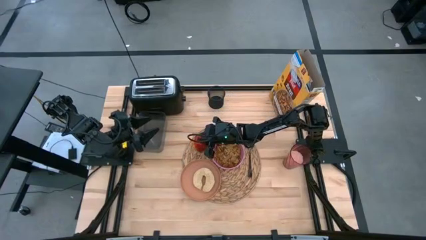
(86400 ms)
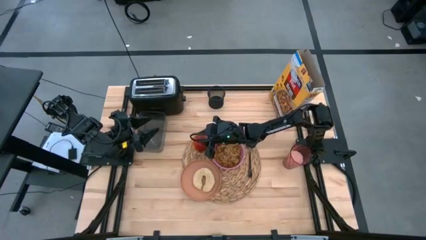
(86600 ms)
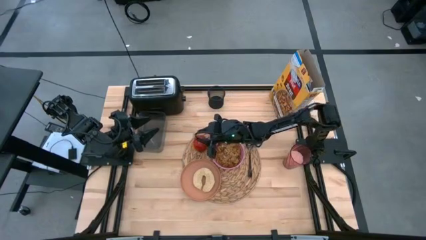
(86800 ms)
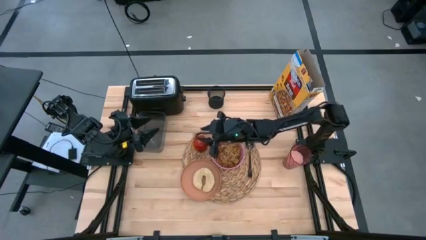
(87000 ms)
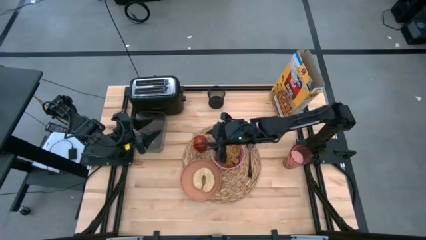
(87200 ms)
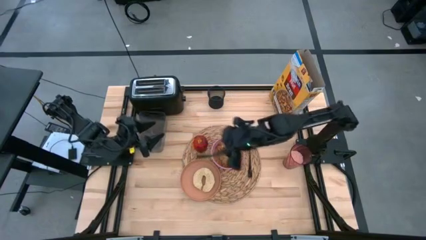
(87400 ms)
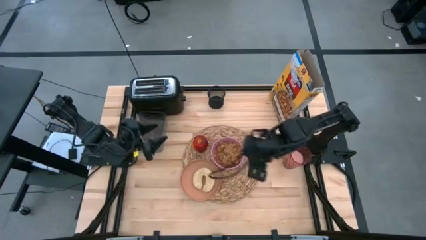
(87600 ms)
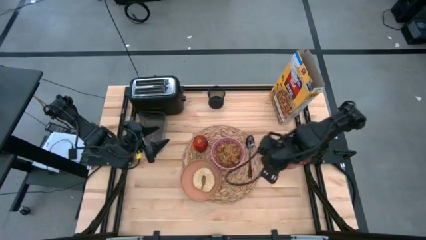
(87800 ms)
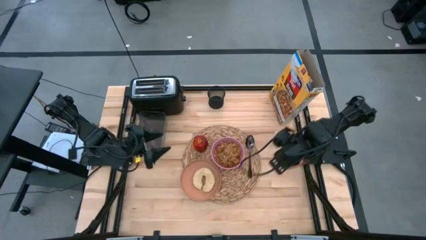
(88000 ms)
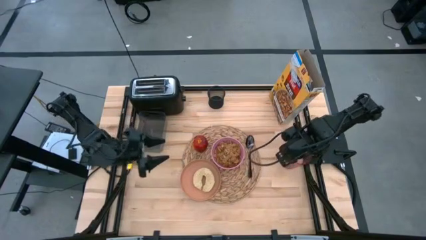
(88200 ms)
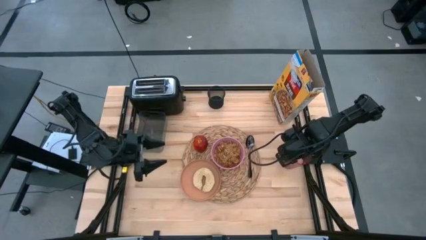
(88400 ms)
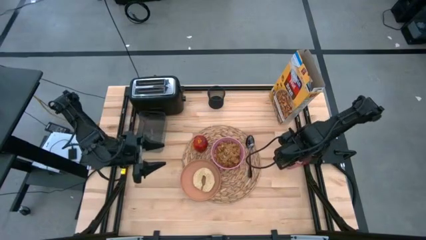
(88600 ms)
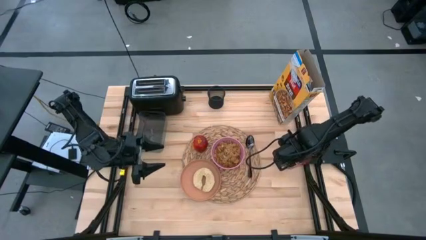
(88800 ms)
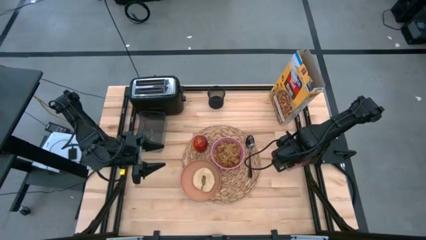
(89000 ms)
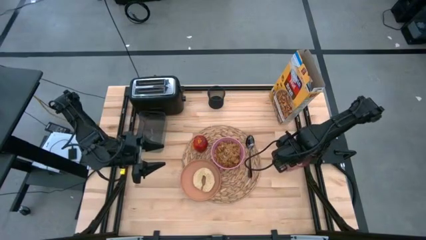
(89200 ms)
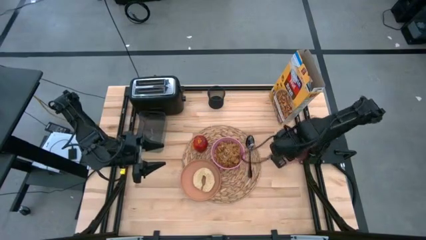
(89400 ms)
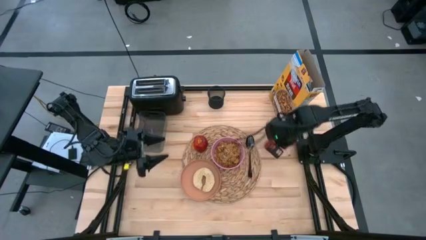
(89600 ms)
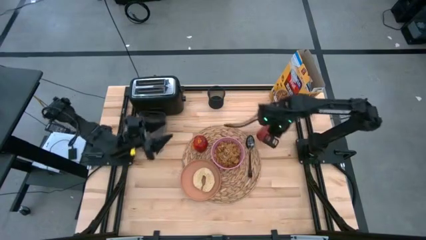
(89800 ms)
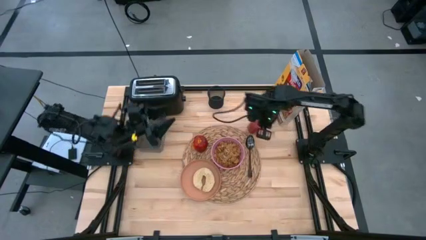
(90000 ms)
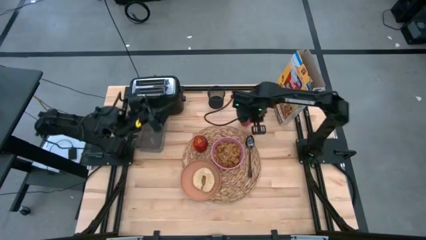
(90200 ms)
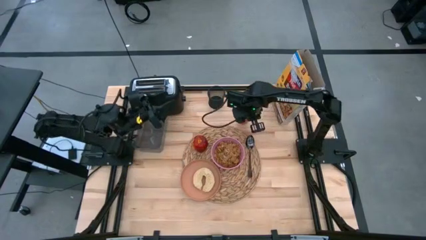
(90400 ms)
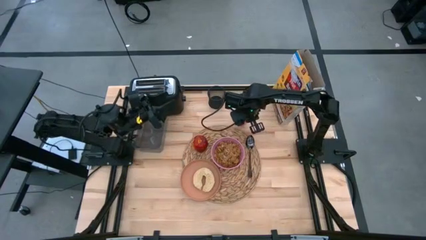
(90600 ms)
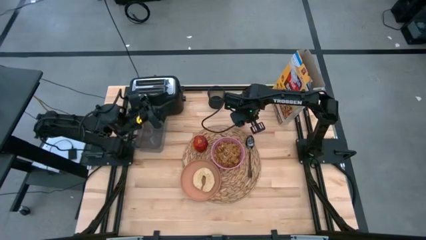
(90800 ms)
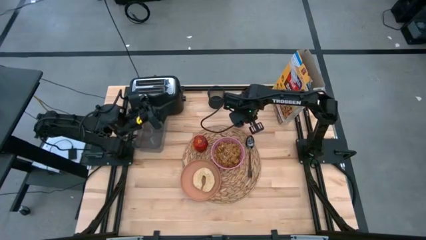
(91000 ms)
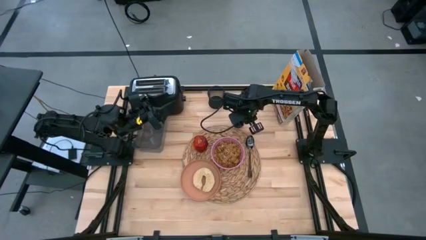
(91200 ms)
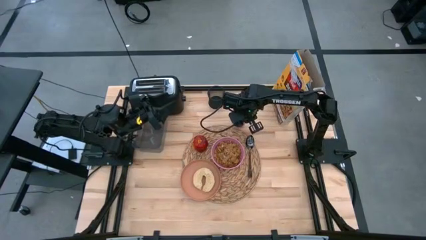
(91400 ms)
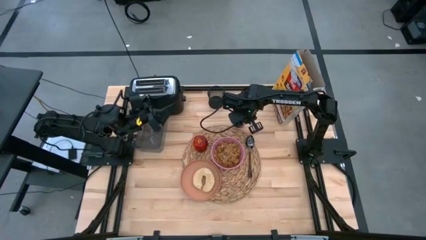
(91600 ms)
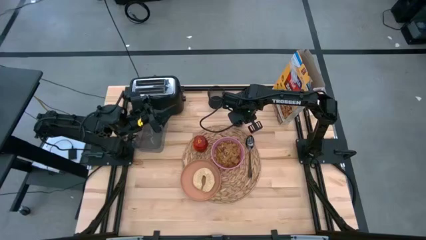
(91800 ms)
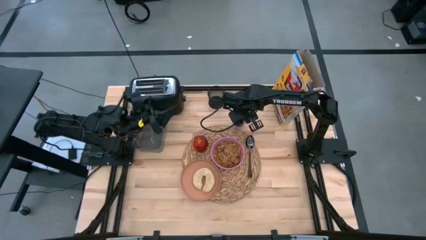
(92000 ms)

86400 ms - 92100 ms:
Task: Arrange a breakfast setting
Put the red cup with rice to the top right of the brown mat

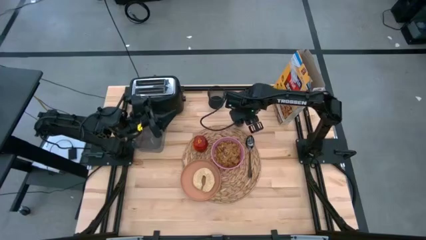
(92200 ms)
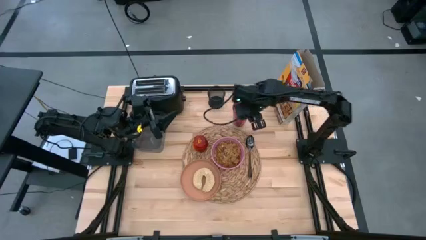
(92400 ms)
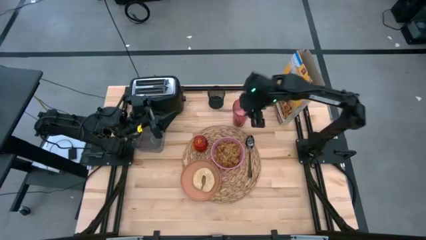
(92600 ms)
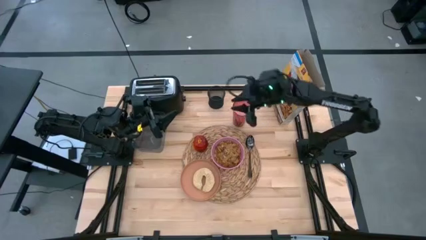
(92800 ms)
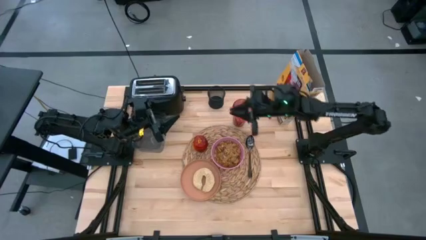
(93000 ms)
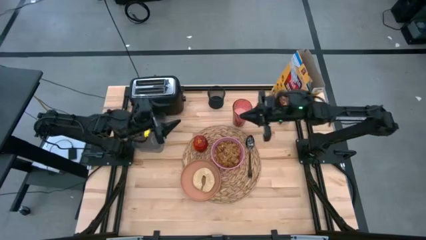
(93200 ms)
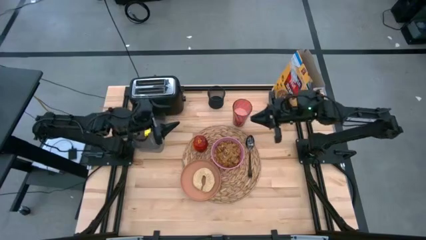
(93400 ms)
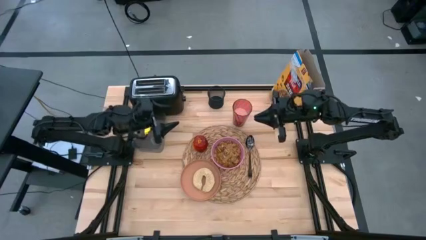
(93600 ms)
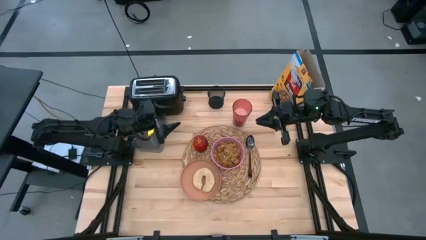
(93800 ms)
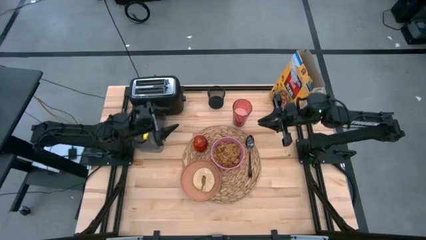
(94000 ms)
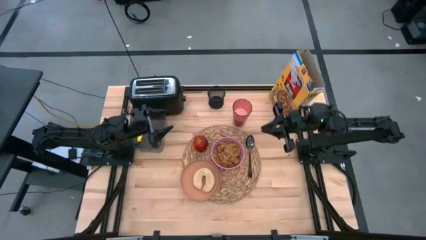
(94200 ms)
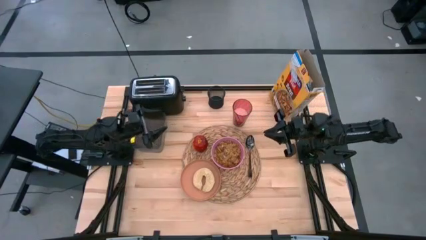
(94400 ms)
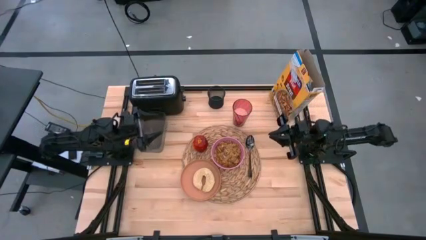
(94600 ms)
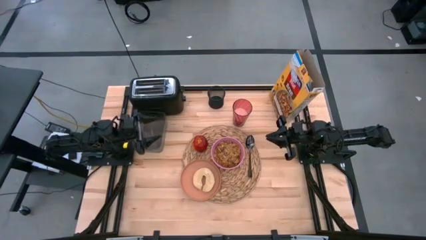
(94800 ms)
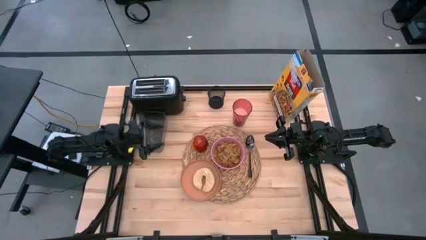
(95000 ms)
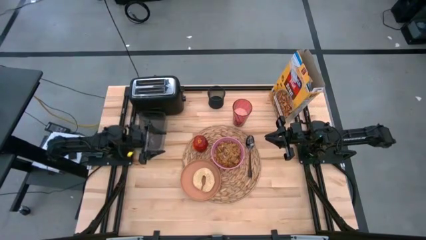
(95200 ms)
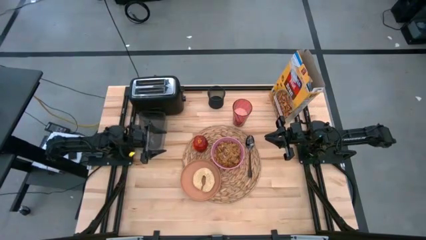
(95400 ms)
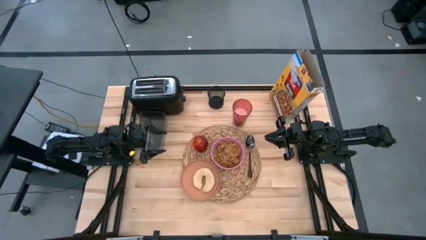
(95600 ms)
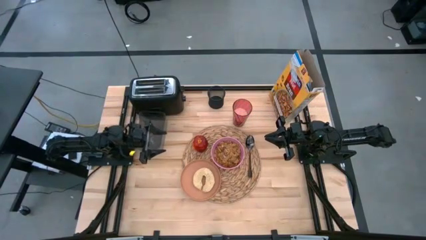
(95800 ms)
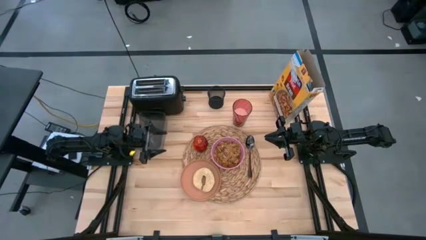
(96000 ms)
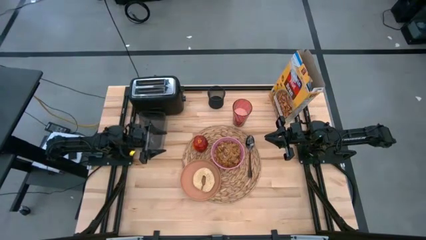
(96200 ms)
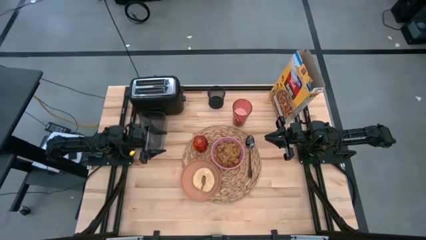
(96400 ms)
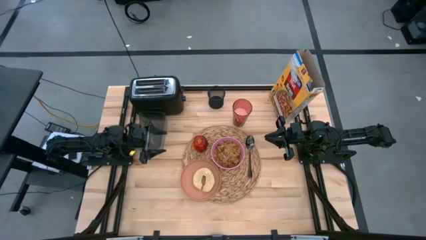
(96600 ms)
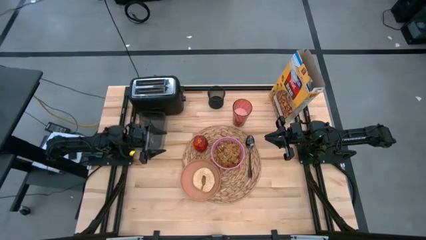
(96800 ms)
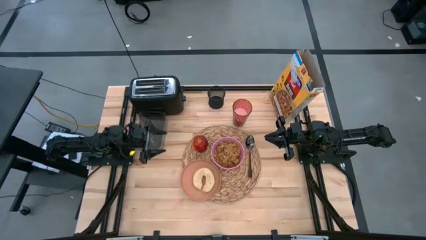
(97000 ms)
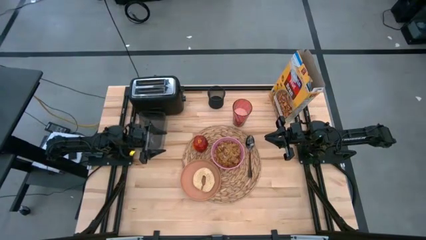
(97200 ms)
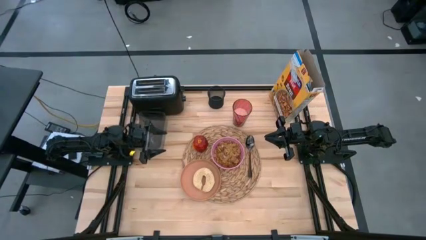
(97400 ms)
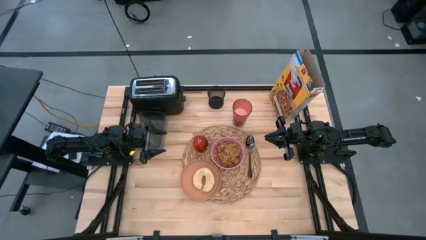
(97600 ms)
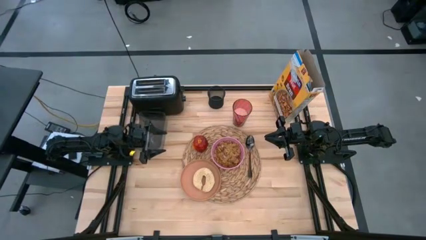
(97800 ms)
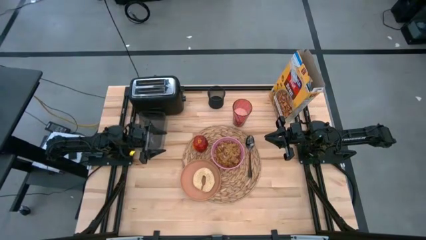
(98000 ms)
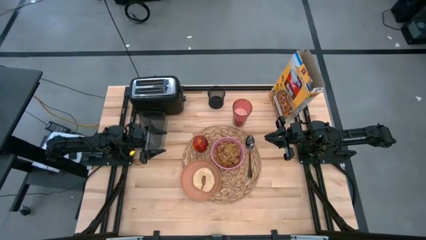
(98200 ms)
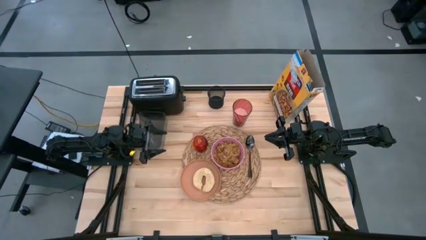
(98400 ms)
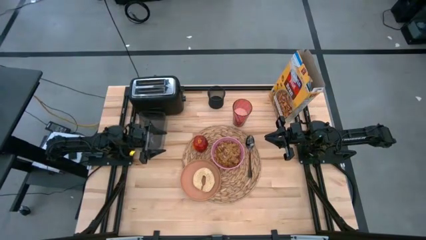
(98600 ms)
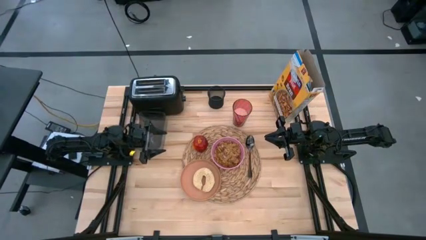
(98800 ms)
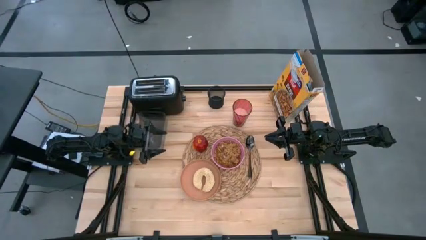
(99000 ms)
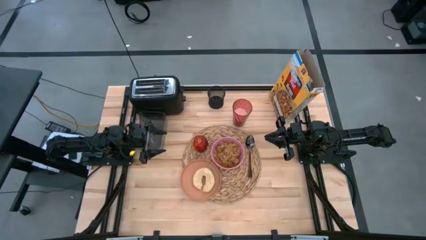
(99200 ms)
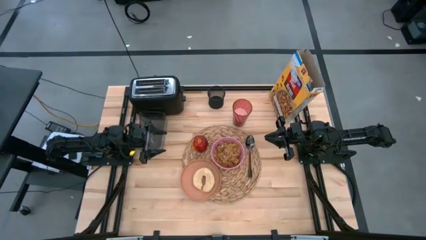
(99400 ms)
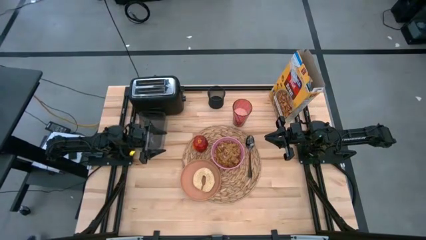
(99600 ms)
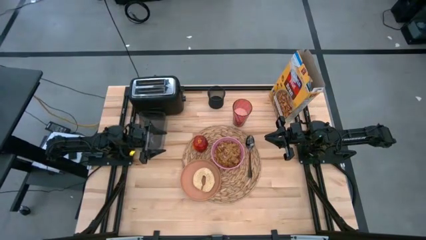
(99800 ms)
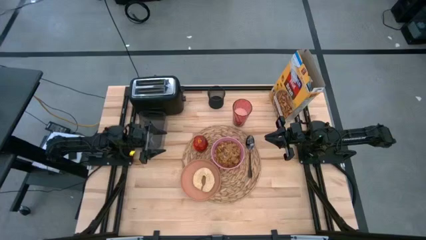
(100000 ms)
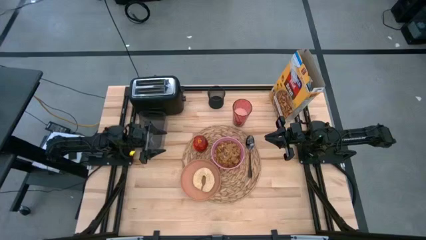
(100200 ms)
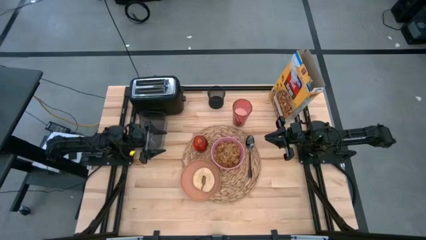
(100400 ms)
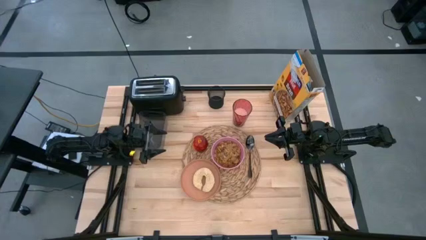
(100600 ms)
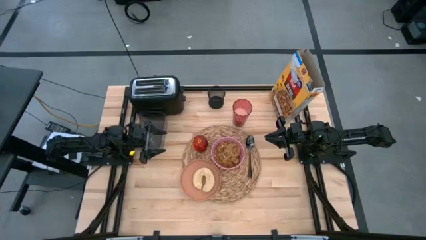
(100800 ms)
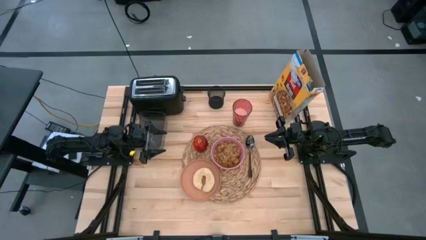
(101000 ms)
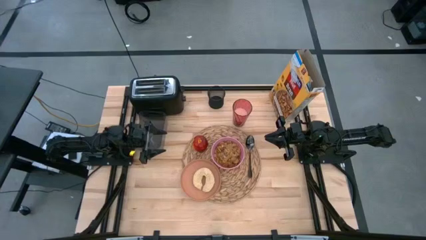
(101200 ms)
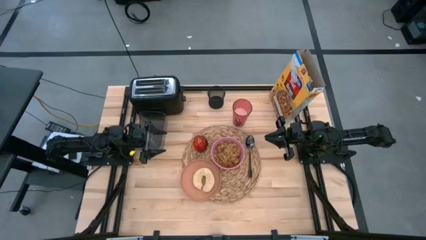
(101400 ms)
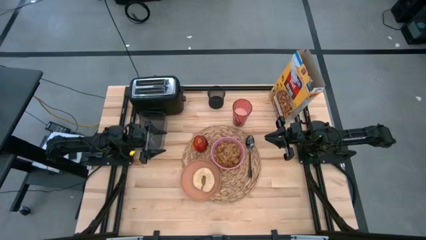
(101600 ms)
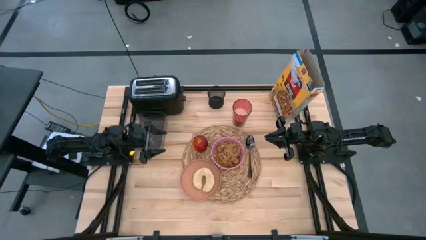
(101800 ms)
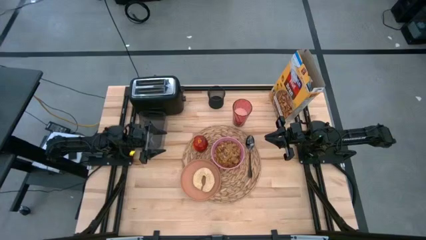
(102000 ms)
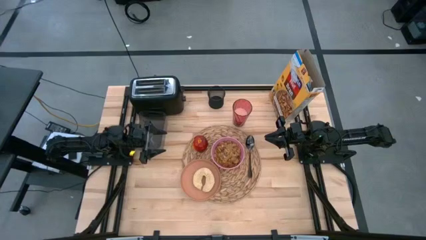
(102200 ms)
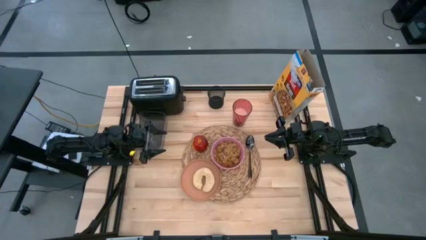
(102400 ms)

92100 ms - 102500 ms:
Return to Home Position
